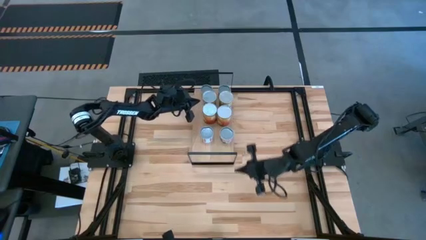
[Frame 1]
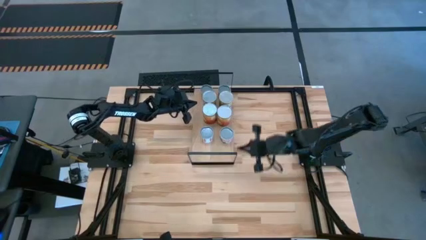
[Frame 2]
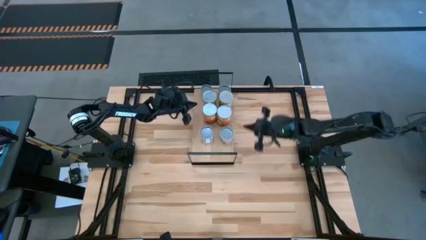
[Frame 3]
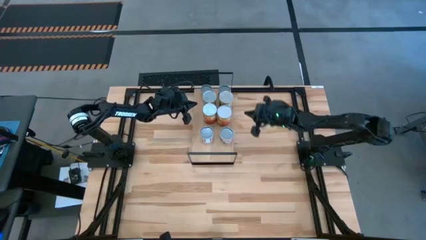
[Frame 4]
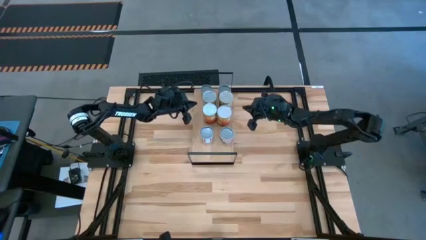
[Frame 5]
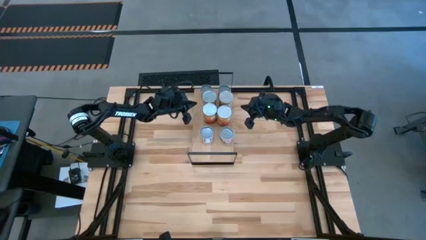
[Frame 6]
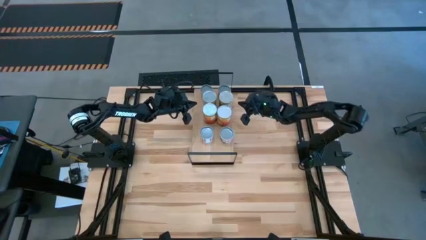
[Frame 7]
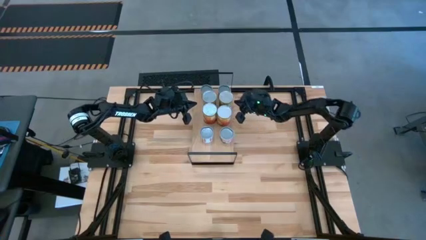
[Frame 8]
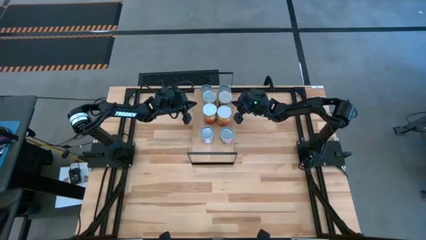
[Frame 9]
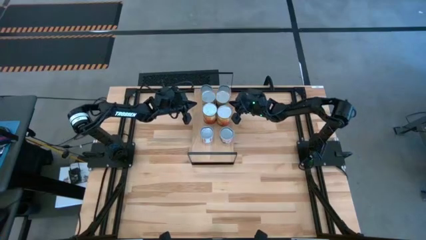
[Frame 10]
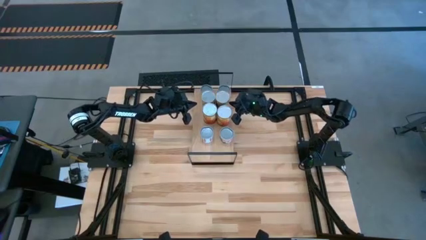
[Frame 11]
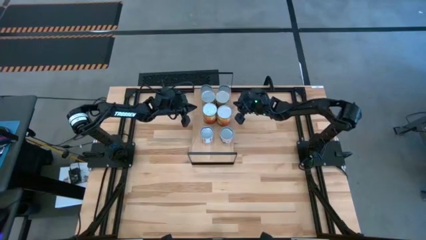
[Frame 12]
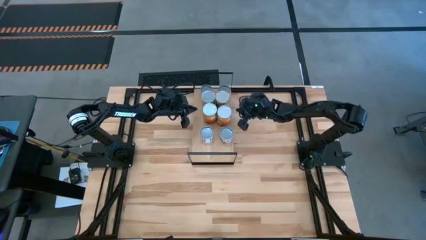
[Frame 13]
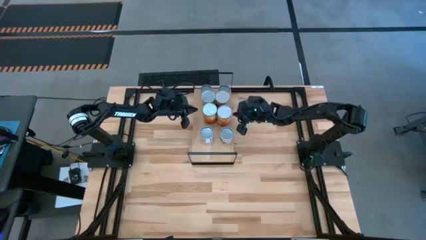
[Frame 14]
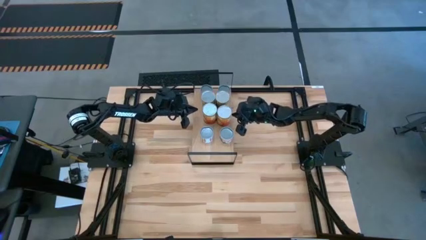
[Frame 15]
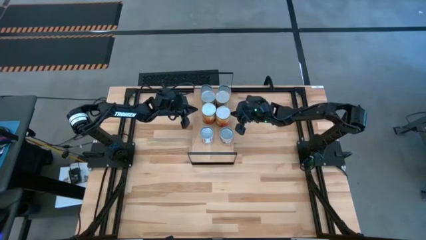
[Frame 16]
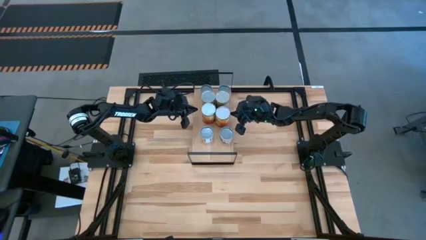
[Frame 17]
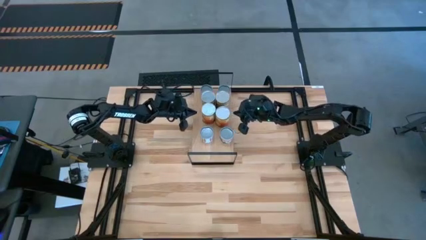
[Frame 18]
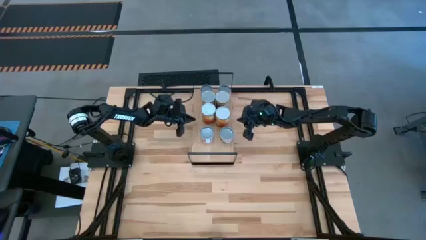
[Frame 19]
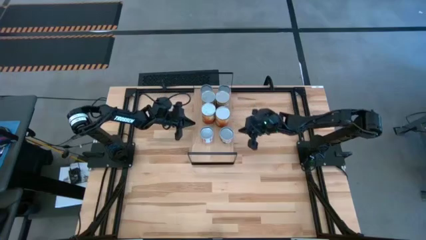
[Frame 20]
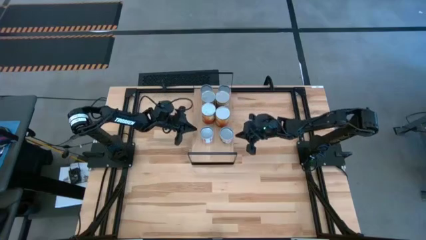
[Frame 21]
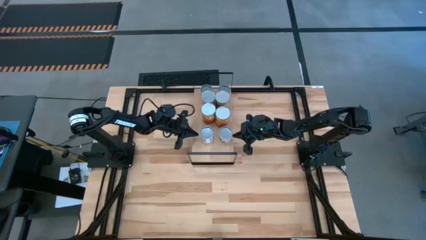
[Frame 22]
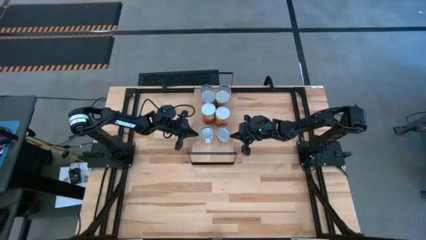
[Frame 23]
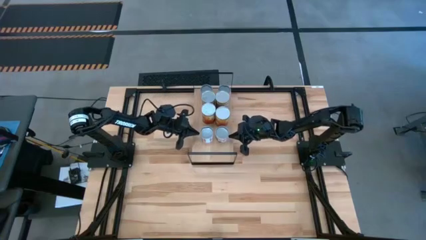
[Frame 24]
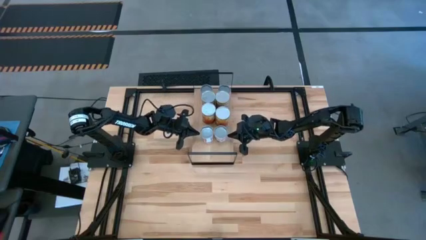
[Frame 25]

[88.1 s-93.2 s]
Task: Pick and place cans onto a shelf
Adjust the large blue can on the shelf

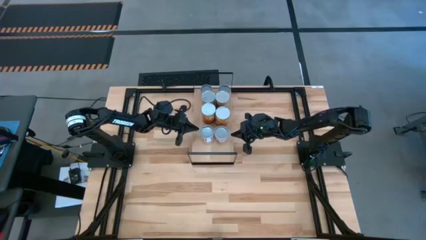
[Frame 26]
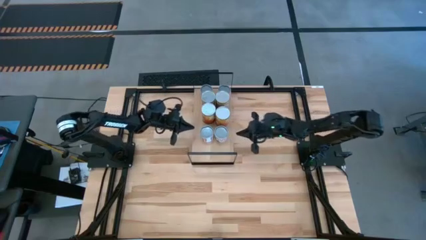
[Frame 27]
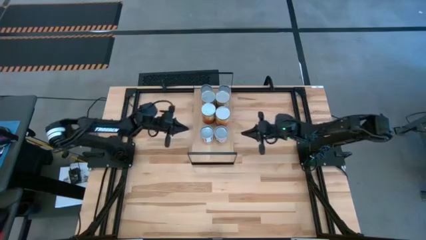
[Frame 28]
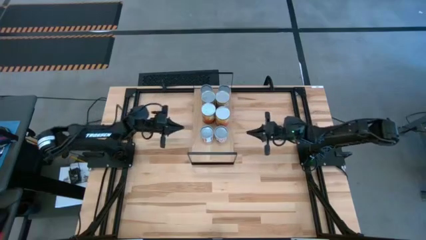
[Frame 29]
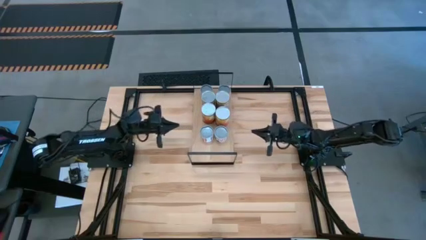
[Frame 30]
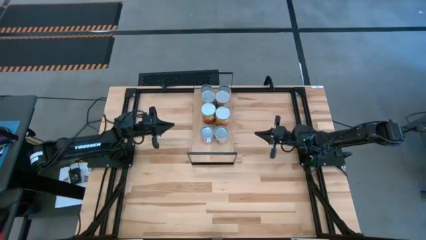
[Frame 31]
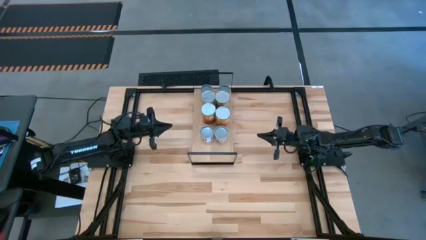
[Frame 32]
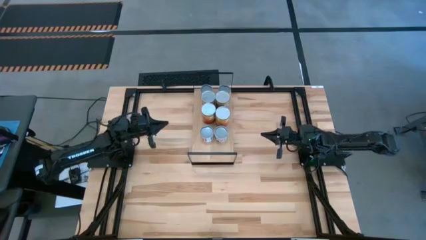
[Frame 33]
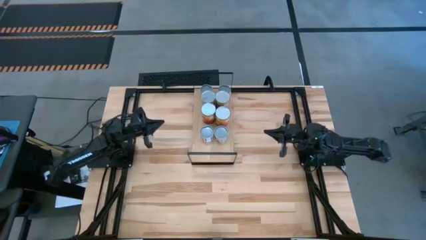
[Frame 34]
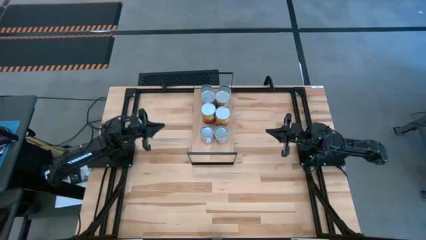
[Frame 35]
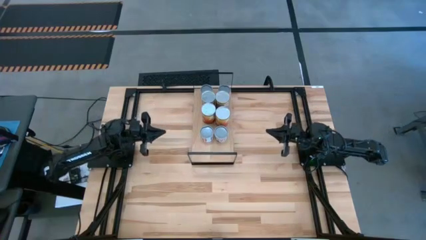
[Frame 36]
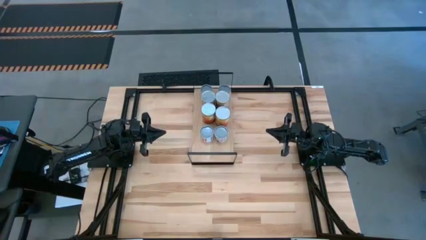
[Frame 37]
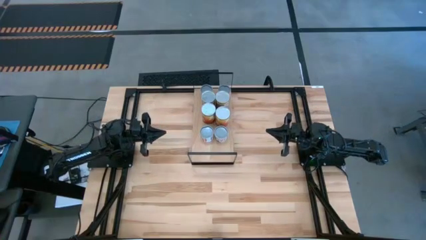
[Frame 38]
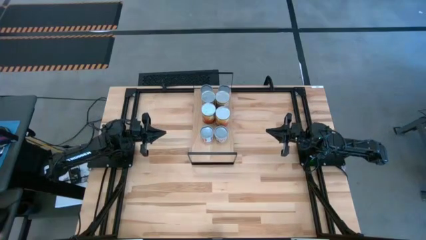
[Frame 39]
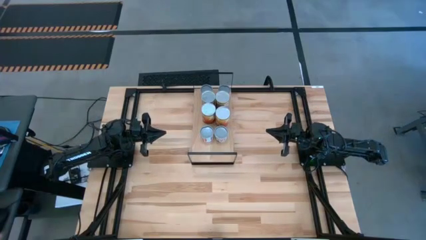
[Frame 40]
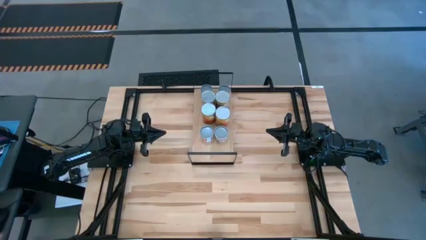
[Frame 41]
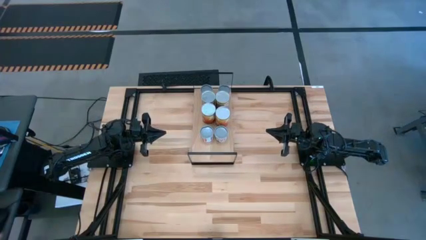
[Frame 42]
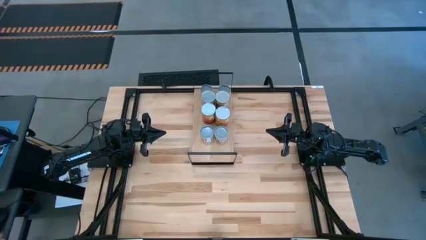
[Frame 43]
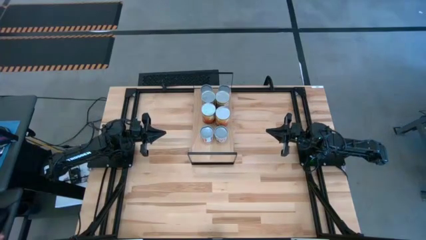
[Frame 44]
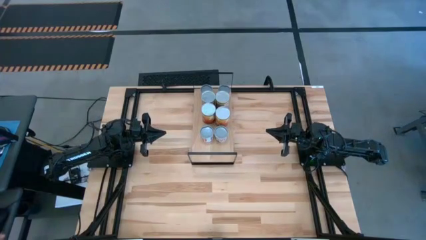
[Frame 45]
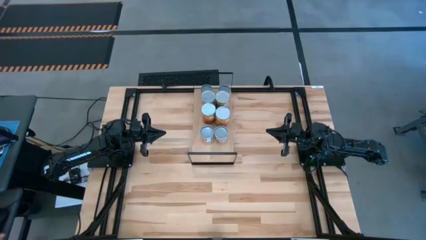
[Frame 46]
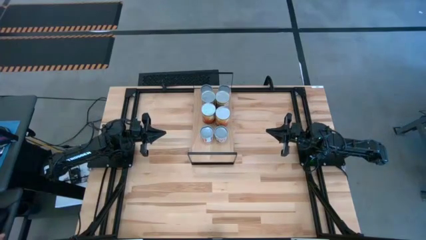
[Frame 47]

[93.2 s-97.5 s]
Return to Home Position

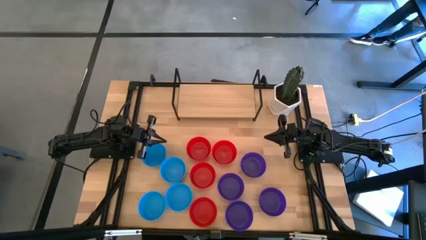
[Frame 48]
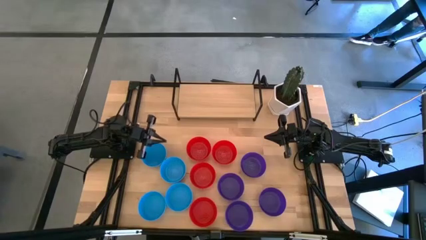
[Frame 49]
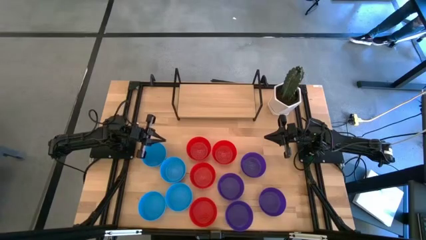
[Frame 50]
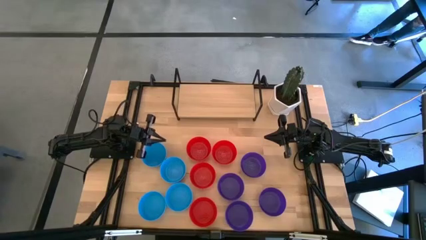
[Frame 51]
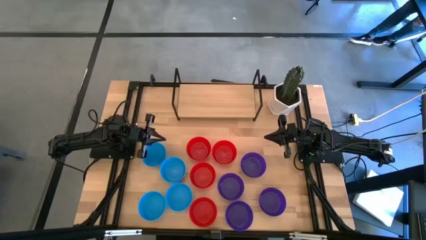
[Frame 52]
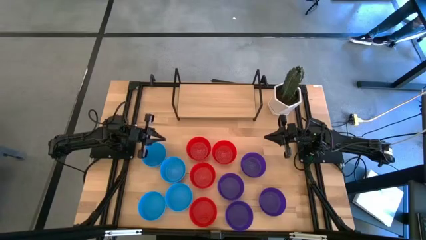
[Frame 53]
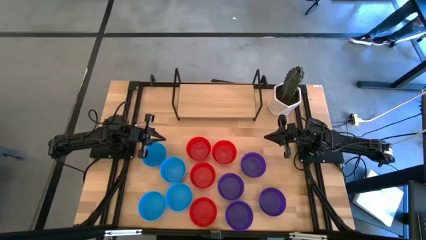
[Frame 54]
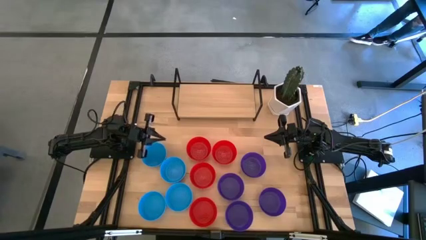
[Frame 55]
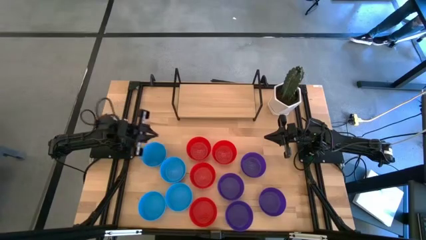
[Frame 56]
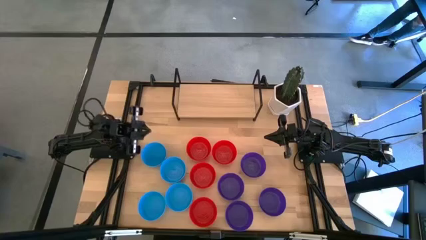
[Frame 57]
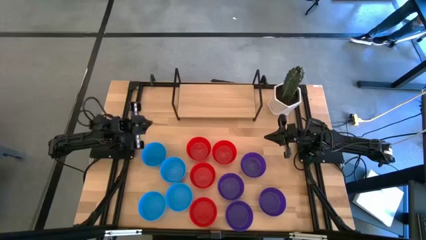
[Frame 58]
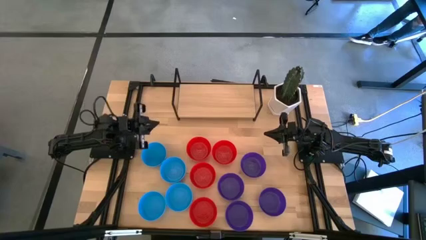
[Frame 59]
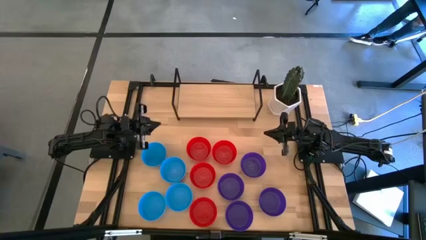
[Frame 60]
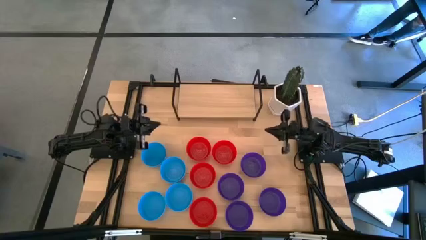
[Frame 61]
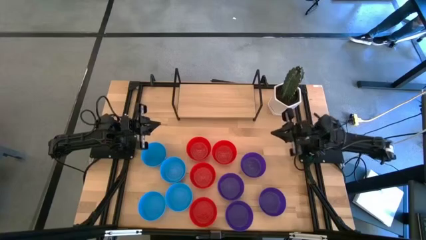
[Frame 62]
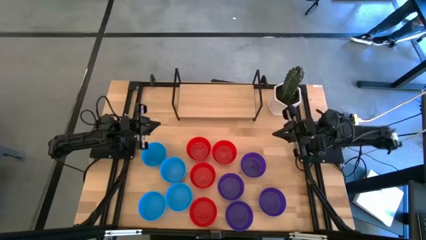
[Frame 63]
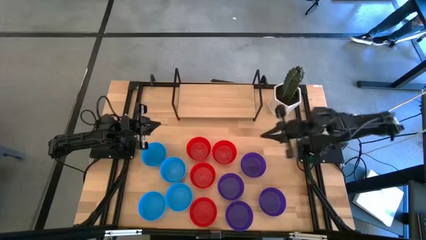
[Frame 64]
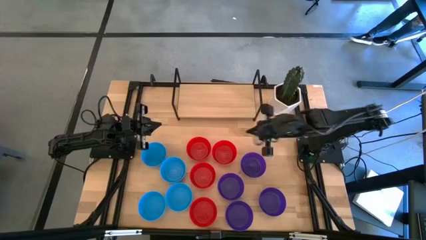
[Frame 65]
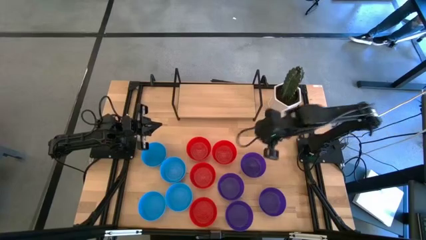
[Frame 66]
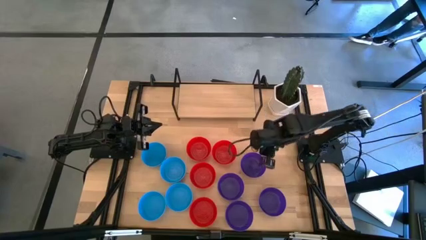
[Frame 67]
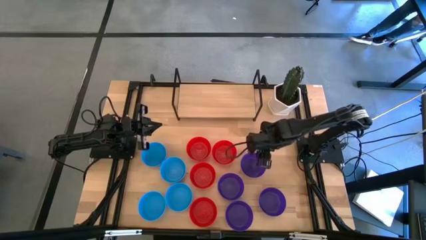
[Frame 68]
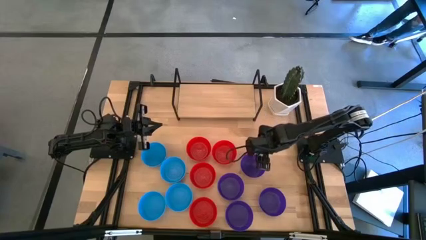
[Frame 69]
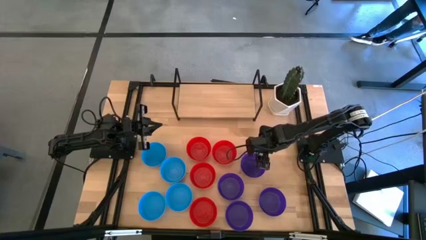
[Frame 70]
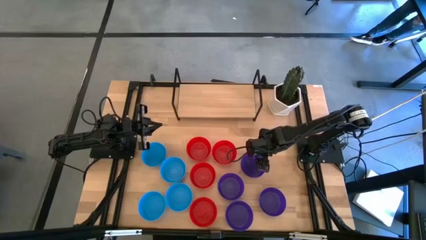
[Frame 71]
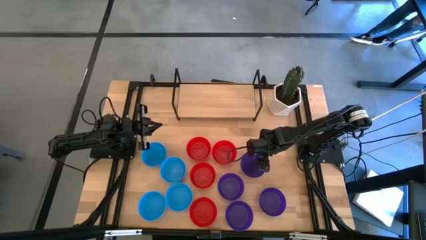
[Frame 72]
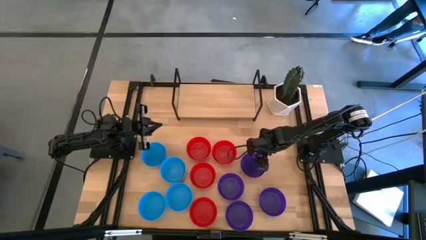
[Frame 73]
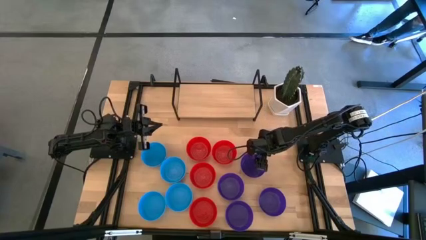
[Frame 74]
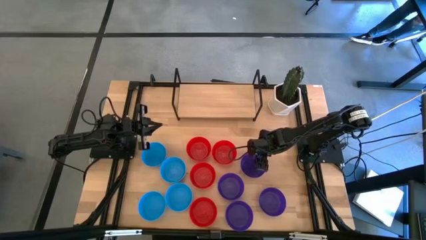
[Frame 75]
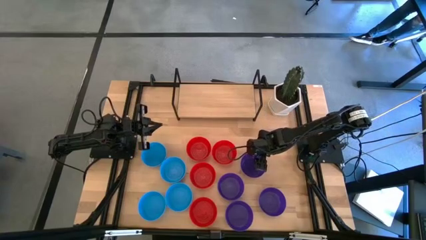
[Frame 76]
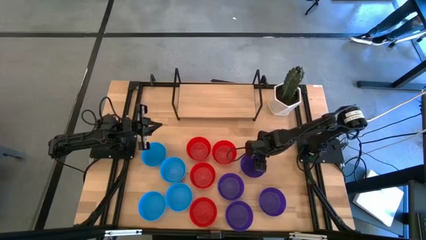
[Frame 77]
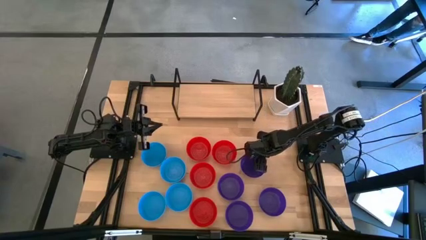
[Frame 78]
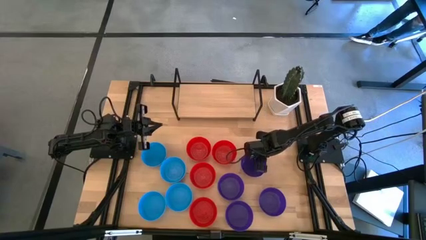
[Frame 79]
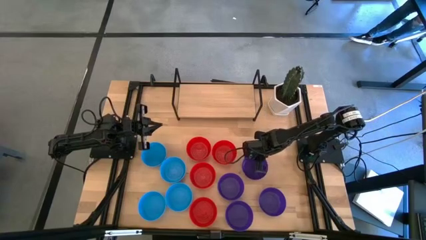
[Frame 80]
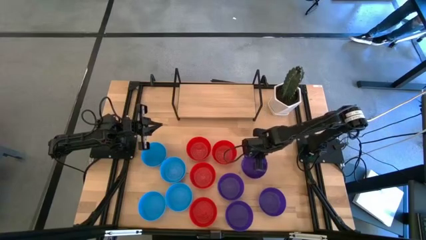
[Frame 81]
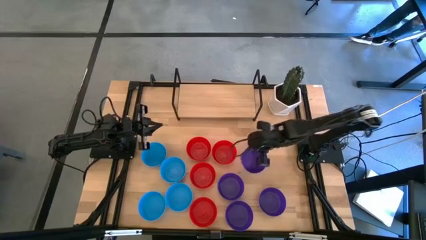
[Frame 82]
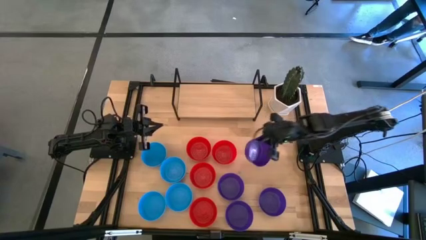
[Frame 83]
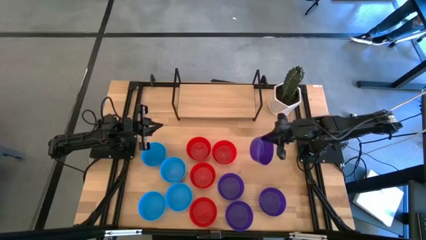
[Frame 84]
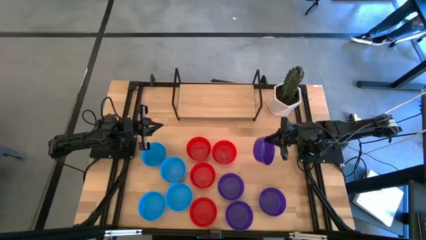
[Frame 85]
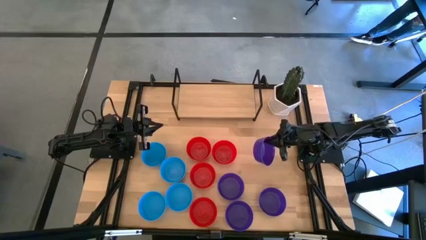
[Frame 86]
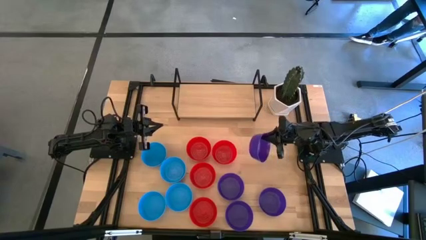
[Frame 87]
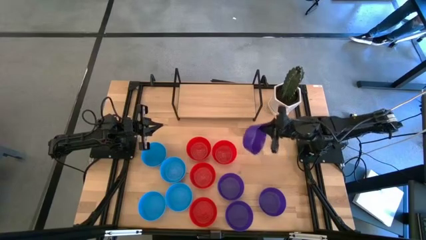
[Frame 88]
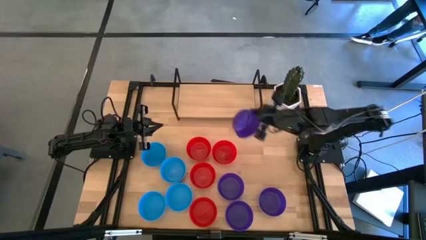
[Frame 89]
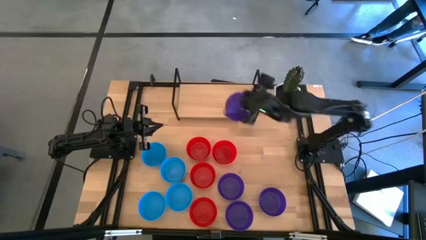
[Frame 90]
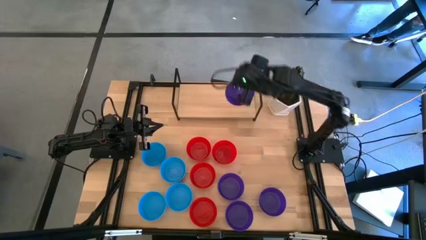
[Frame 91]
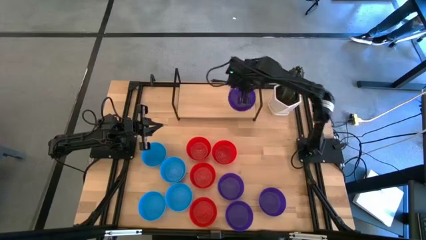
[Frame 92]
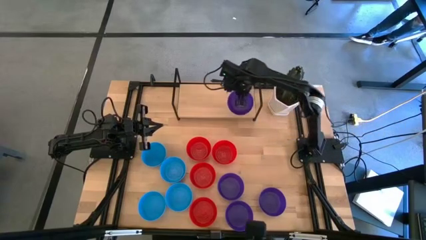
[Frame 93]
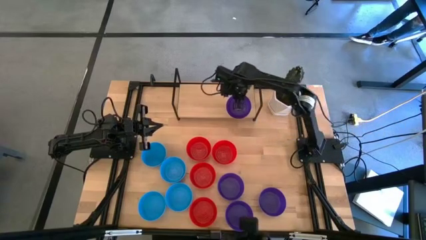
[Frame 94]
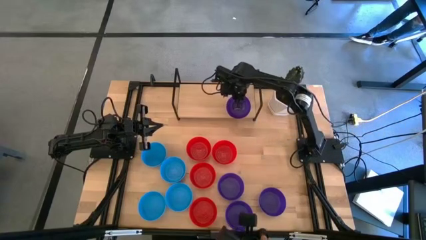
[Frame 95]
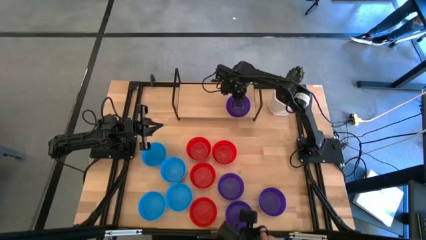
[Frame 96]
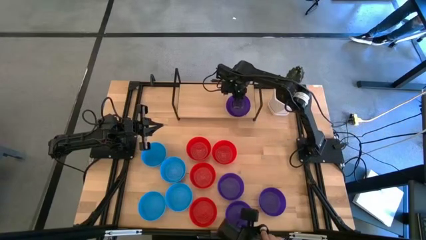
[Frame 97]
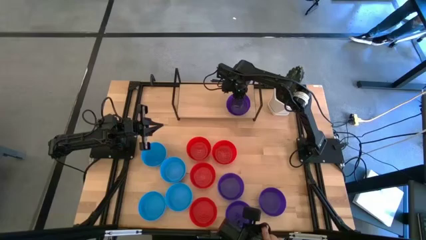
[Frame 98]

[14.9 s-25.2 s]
Task: Pick & Place Mini bowls
Put the purple bowl on the shelf
